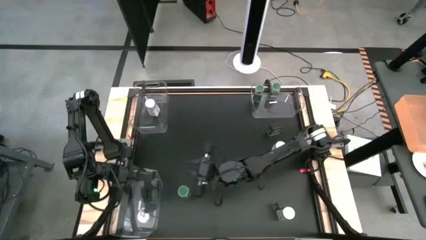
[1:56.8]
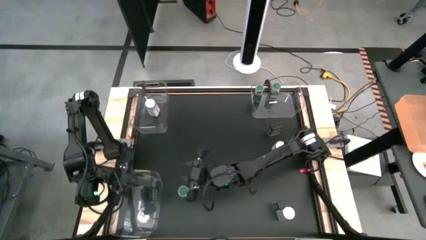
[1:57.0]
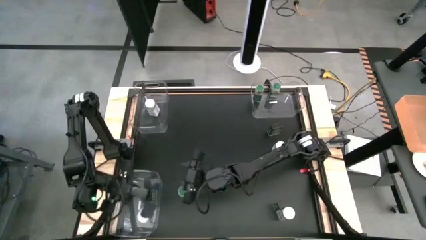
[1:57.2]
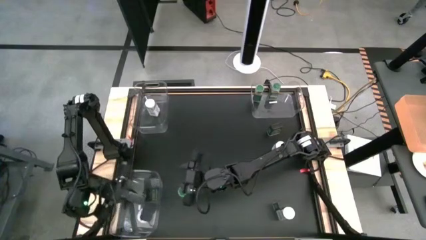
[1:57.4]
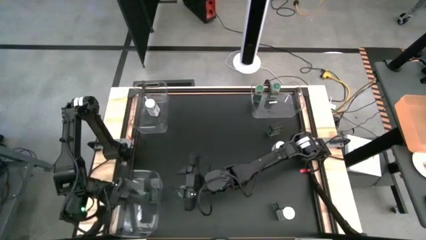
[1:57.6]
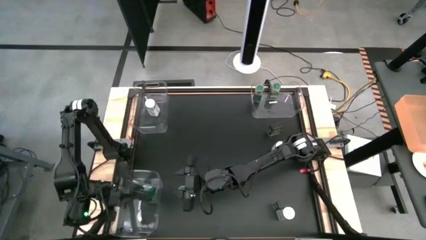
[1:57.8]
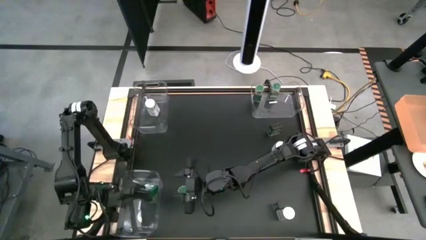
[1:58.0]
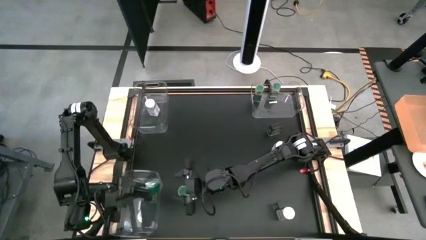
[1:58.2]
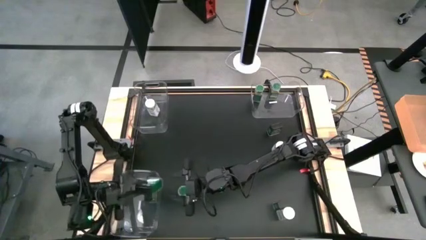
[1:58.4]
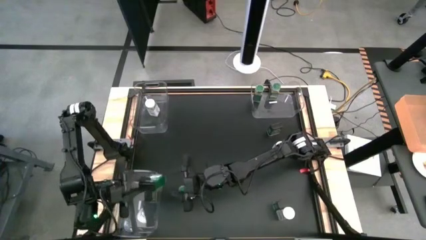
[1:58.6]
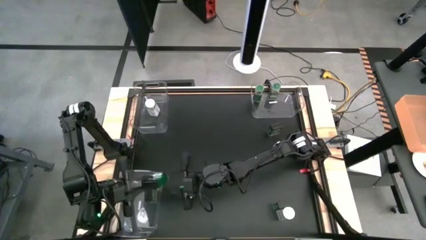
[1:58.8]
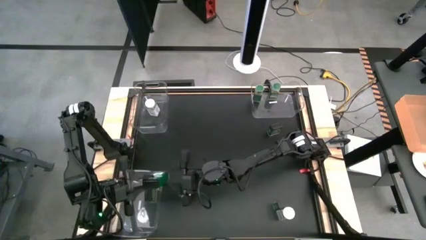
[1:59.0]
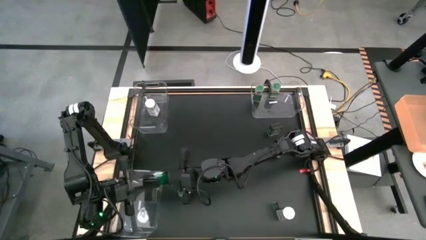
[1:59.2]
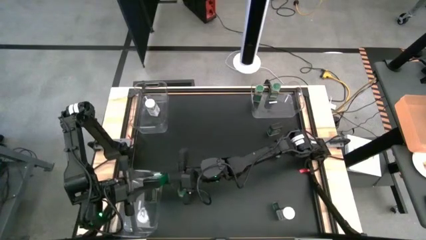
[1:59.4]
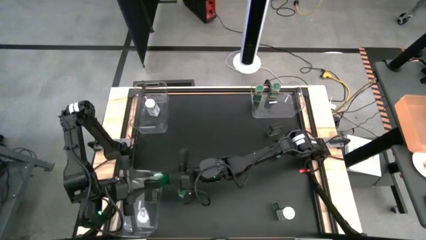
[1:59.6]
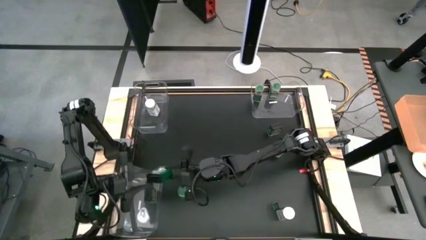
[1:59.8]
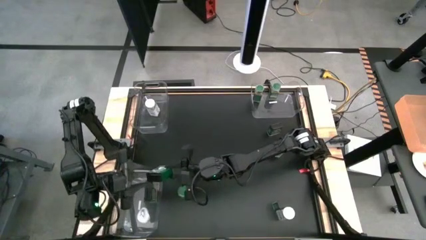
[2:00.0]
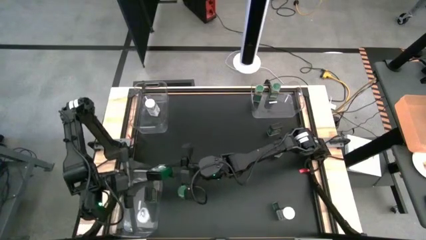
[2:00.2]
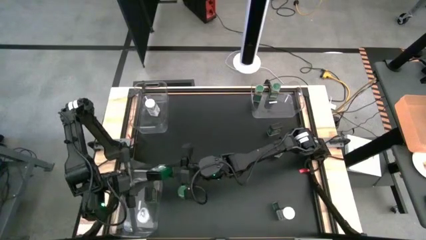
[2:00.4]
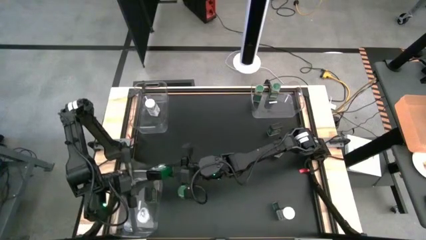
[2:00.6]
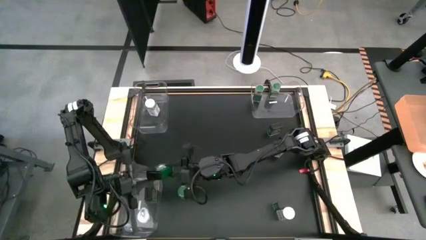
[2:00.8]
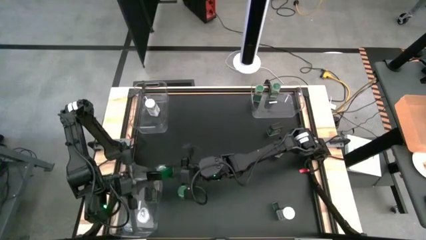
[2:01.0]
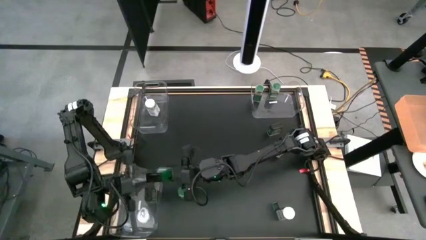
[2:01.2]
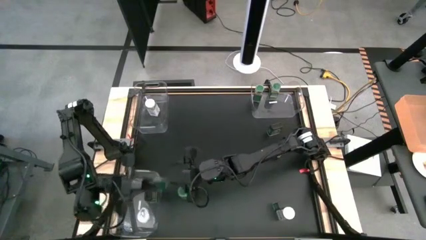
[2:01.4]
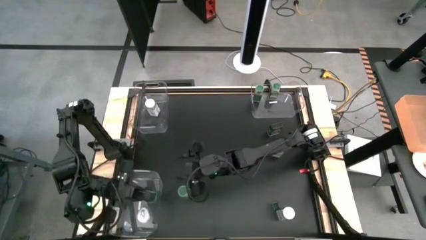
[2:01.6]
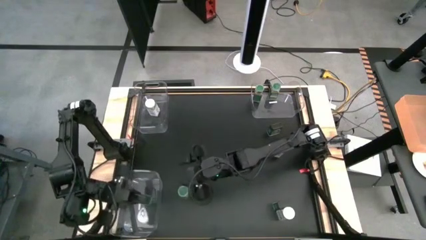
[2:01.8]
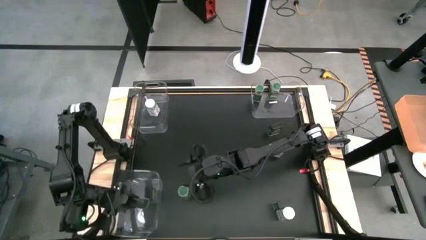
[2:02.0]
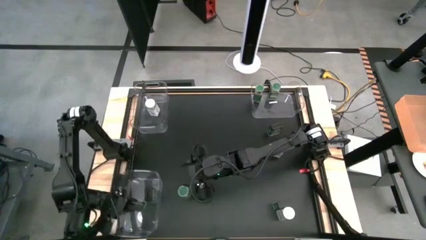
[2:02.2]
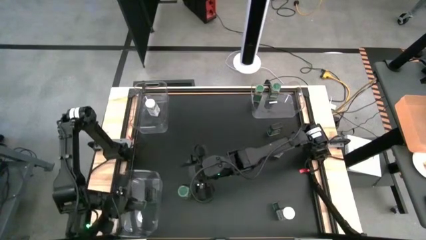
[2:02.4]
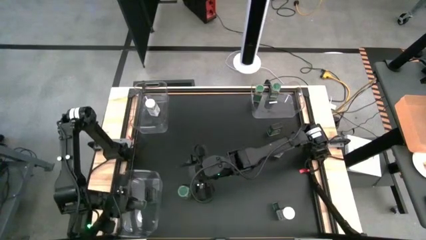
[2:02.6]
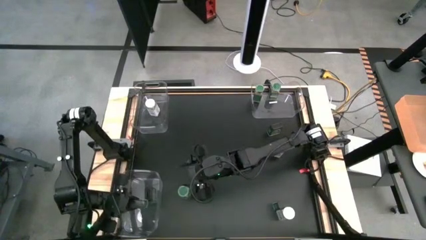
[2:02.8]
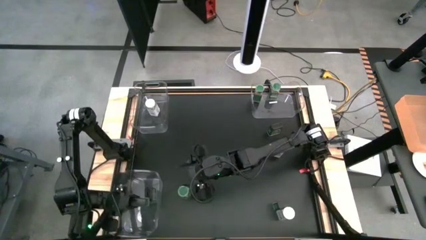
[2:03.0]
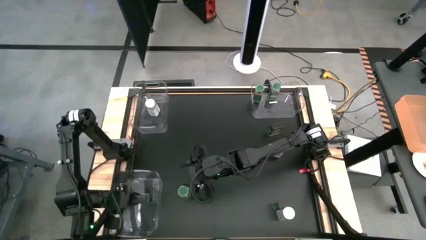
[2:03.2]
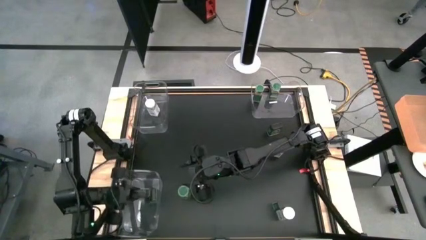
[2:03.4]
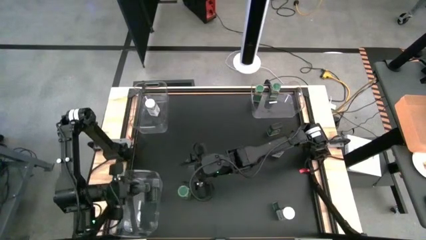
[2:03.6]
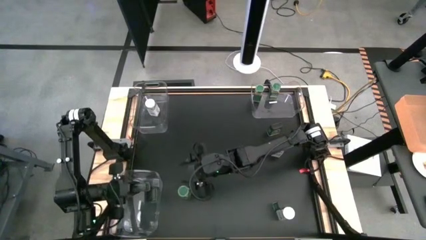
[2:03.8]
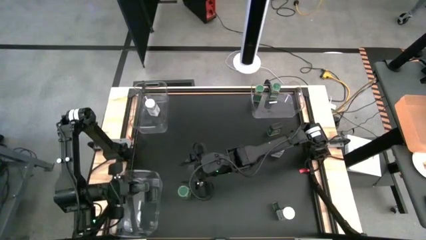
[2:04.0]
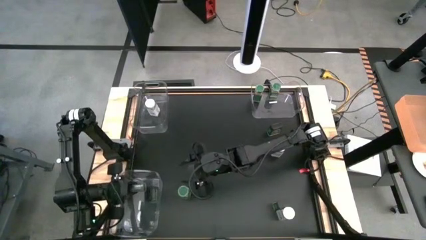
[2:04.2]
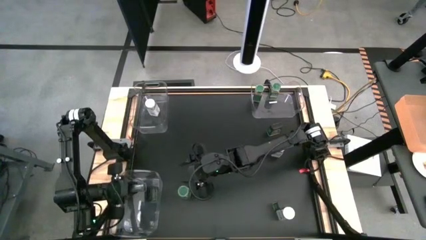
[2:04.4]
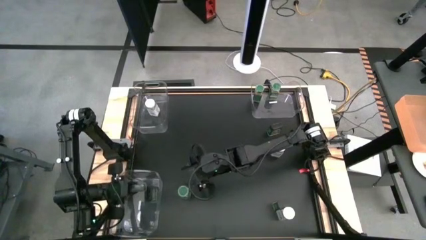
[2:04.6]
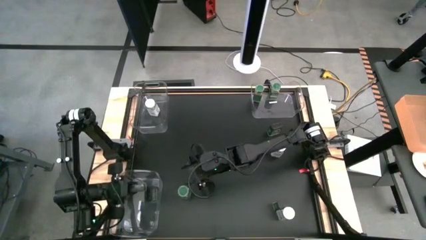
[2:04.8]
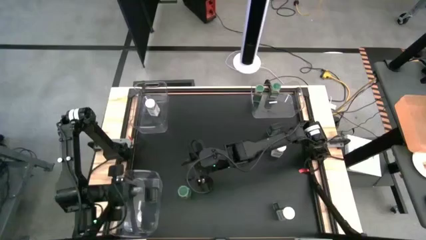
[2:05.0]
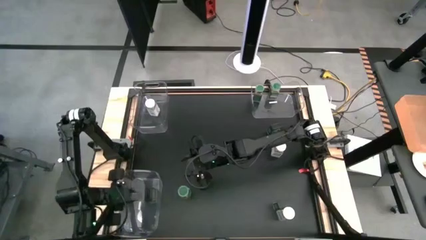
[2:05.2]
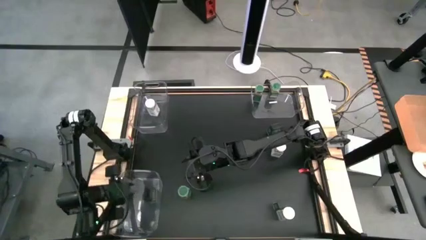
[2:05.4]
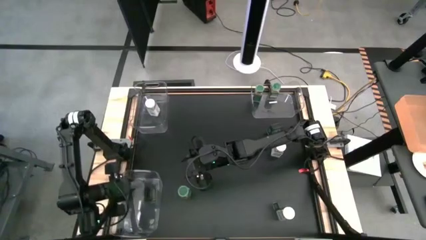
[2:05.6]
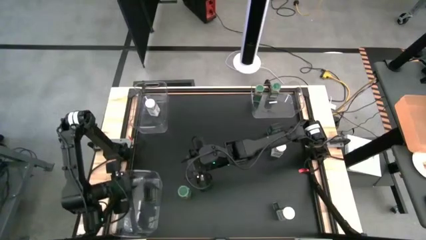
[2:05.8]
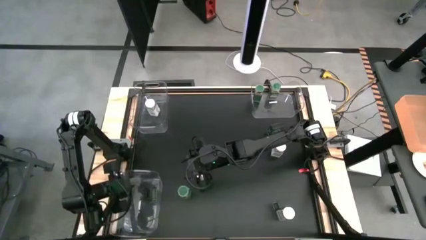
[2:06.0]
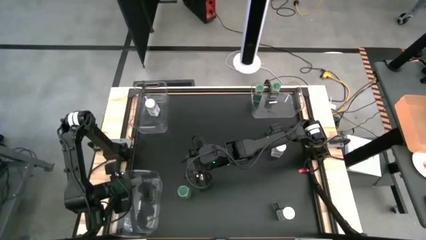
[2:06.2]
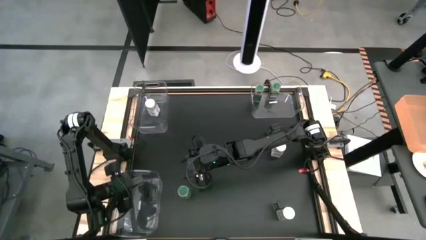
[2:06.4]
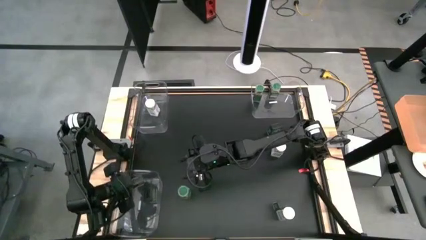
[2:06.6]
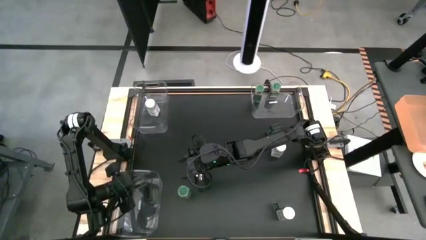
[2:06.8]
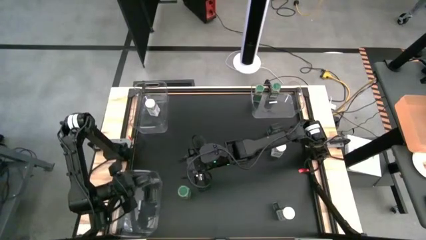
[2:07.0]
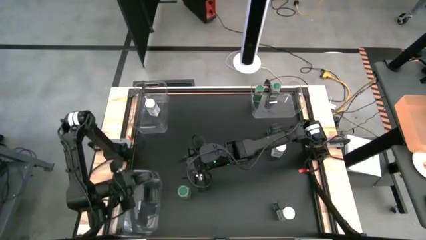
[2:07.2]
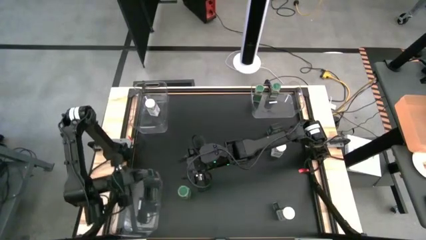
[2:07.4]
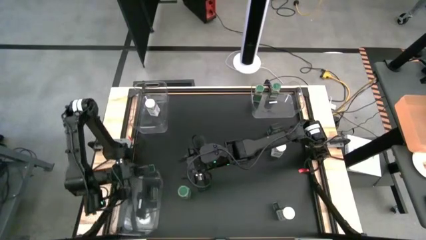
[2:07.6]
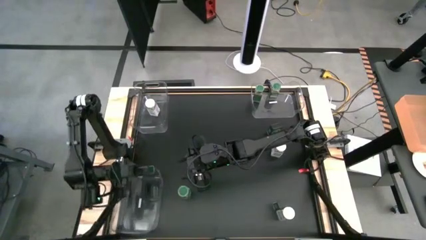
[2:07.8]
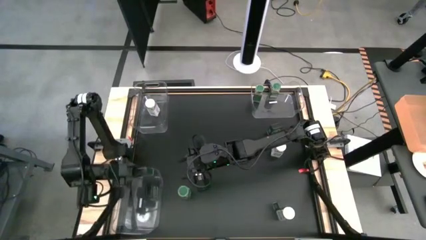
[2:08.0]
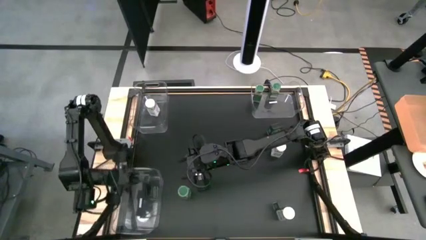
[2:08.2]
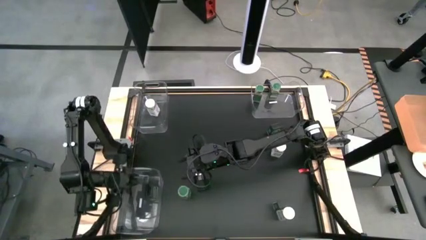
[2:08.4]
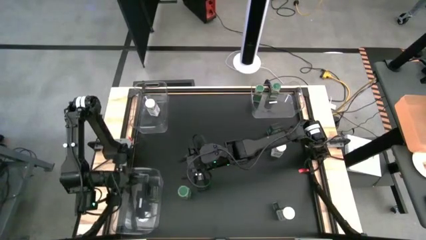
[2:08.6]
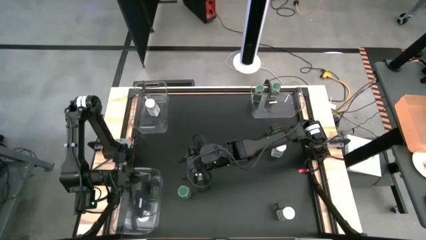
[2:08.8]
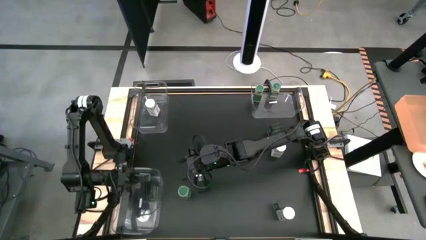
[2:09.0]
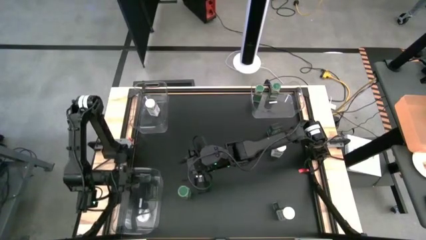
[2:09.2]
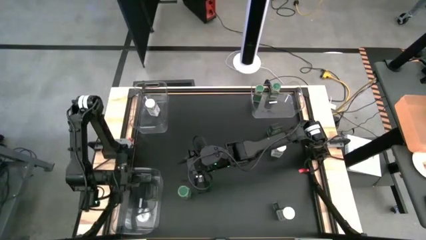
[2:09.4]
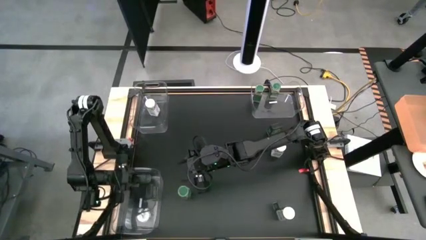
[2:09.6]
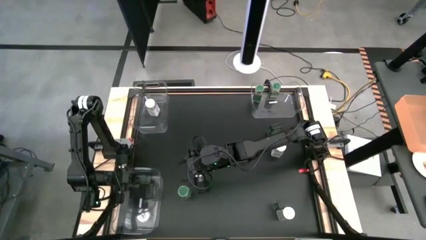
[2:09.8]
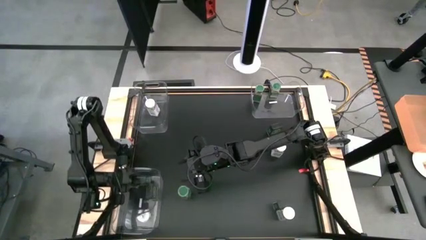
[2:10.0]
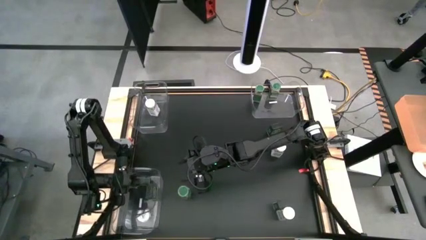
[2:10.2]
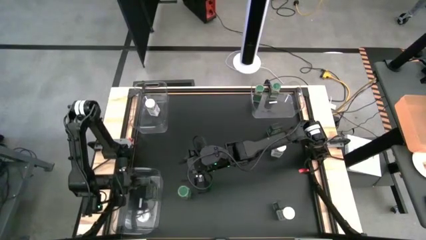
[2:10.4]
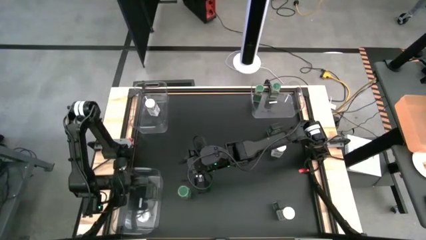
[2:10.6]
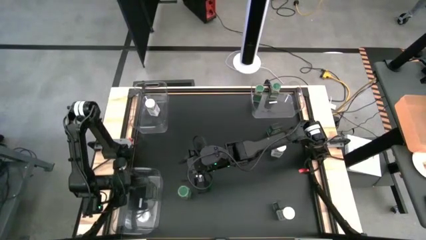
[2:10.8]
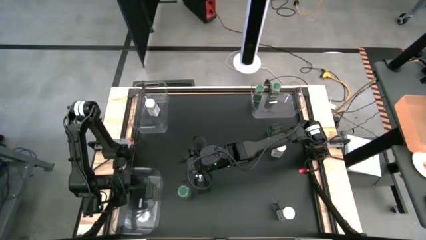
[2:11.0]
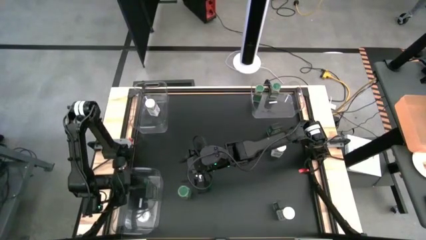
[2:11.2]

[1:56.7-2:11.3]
Task: Sort spices by type
Put the bottom left black seasoning can into the bottom transparent bin

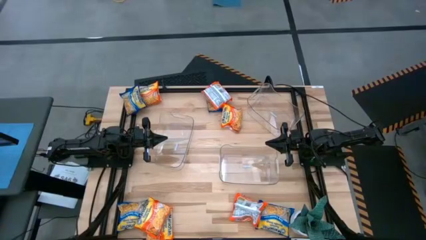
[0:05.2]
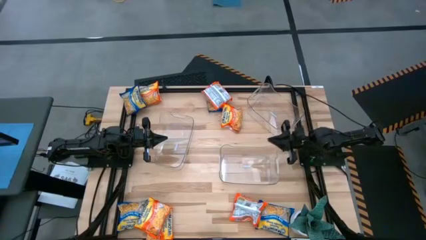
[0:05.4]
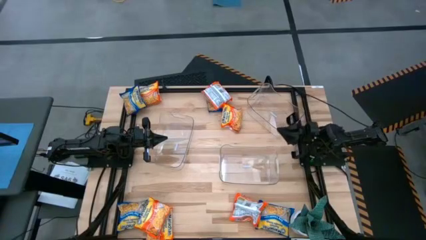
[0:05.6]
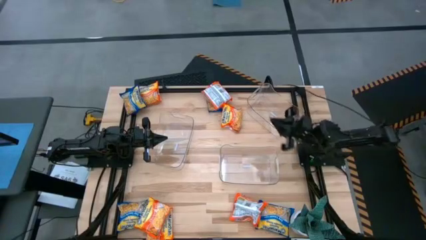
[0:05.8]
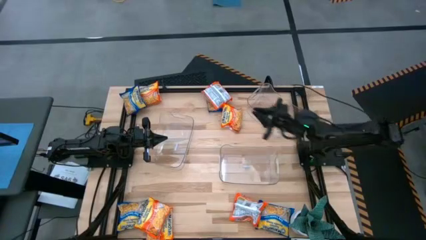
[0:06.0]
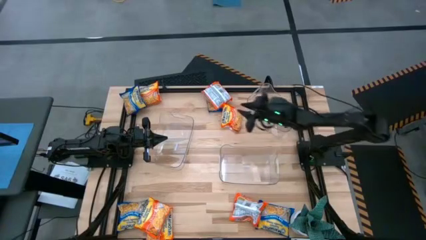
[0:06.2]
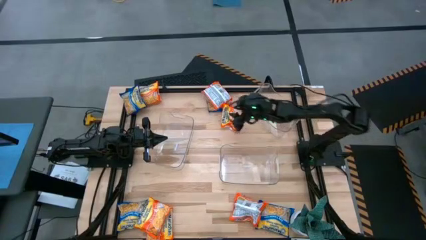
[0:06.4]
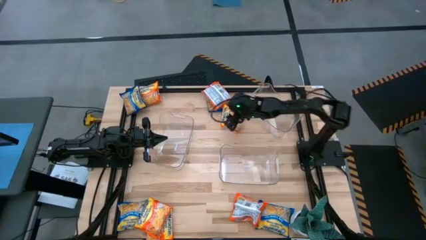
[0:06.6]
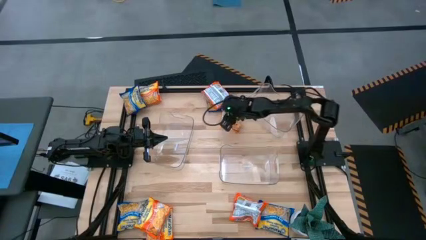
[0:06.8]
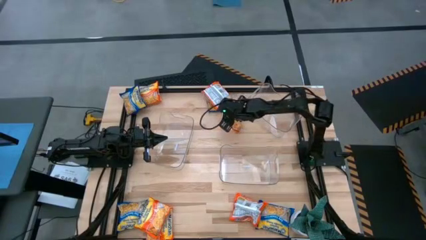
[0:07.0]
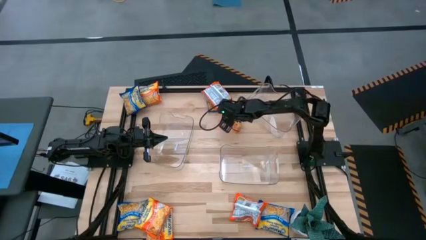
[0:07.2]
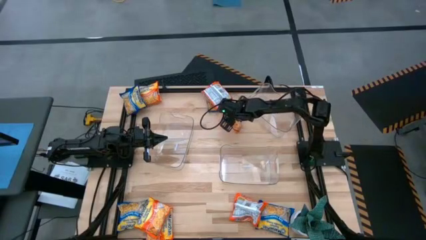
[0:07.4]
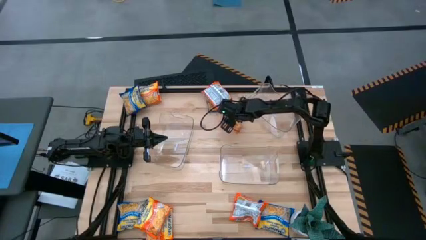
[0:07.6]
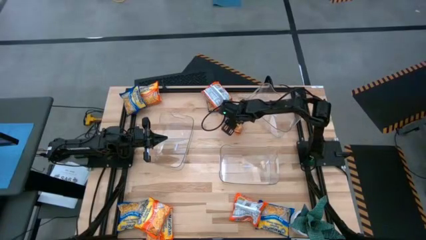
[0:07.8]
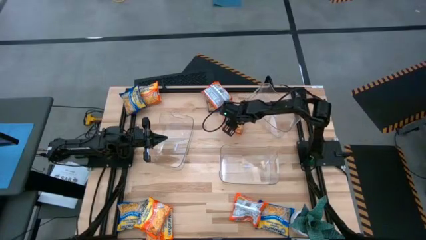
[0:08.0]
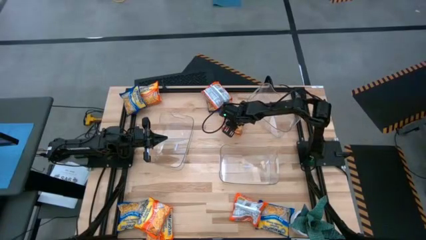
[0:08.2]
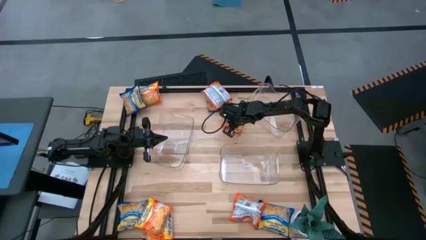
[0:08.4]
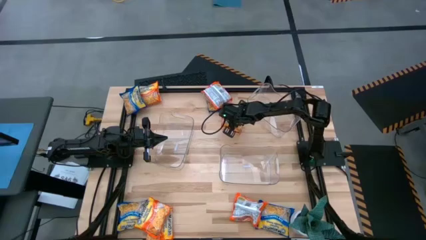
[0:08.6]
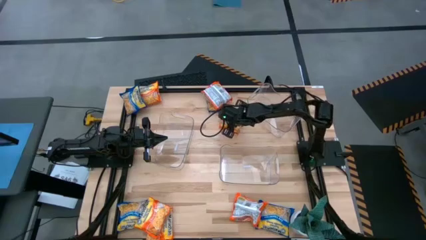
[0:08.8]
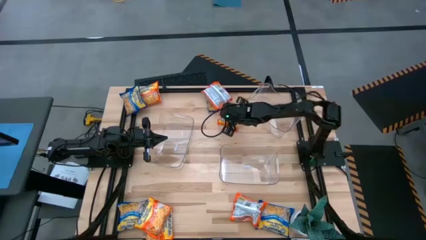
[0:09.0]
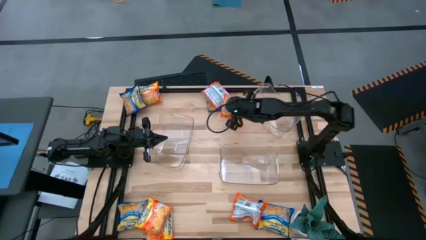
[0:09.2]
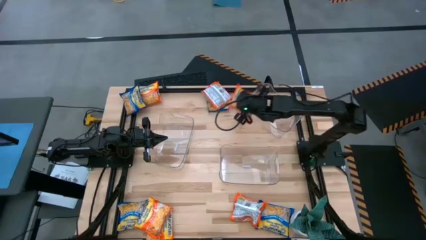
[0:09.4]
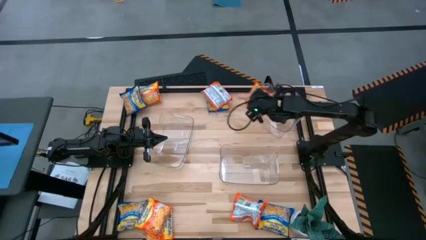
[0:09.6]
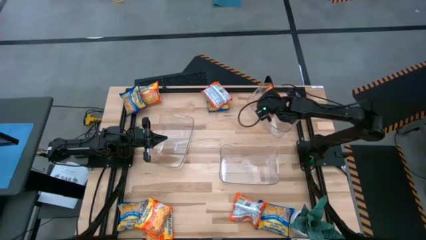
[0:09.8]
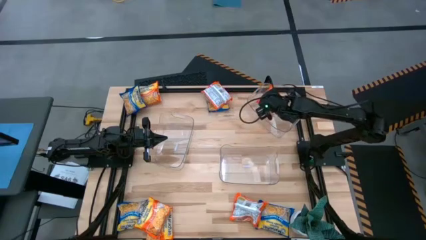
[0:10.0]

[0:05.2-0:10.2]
Task: Sort Maruchan noodles
Put the orange noodle pack into the top transparent bin
